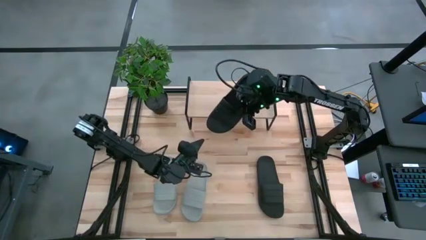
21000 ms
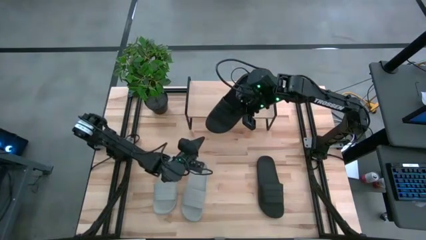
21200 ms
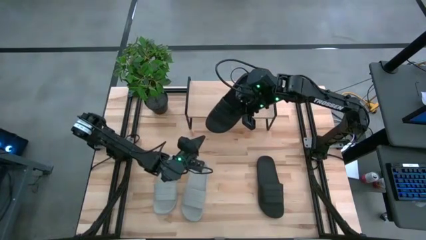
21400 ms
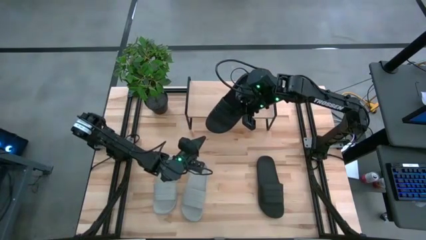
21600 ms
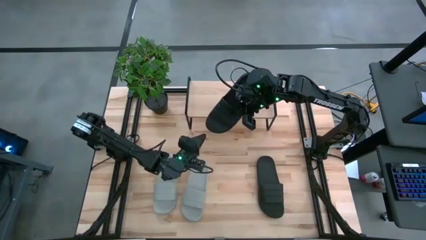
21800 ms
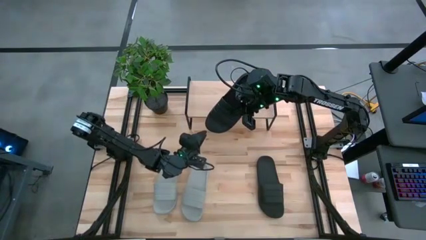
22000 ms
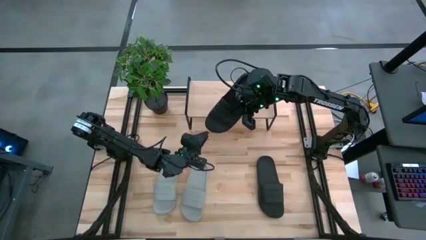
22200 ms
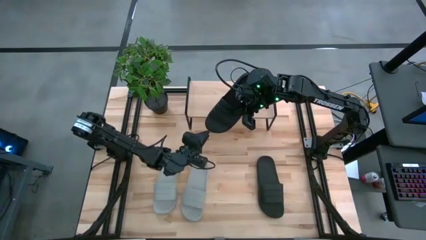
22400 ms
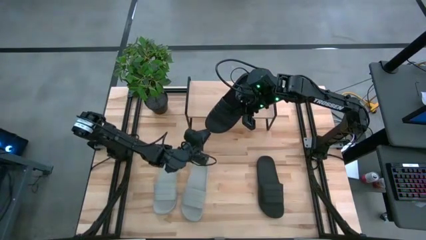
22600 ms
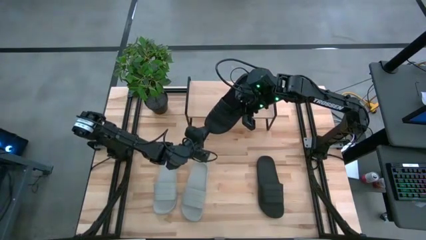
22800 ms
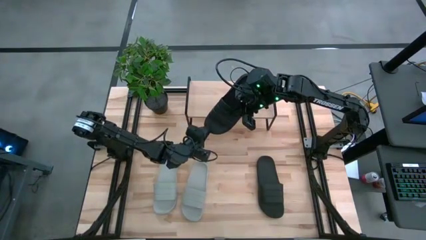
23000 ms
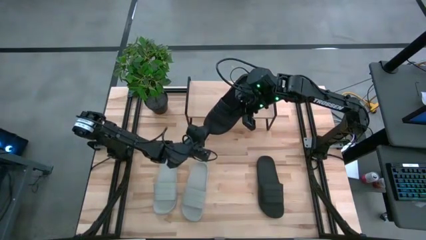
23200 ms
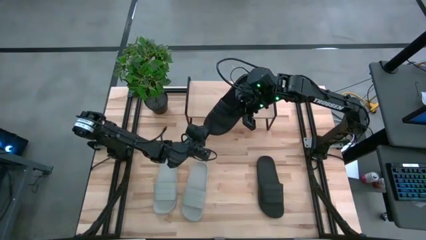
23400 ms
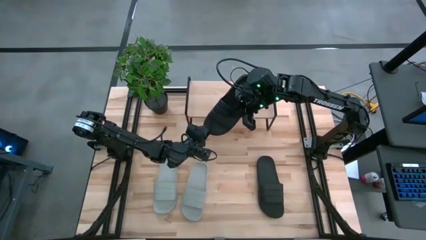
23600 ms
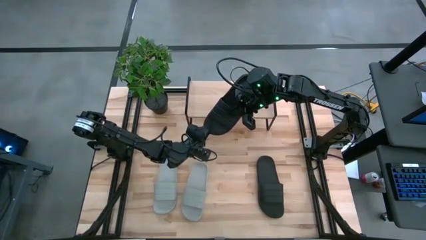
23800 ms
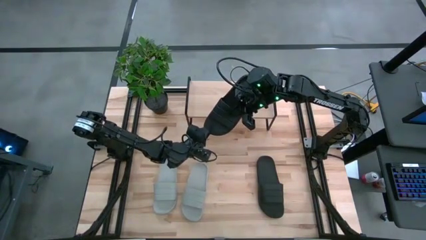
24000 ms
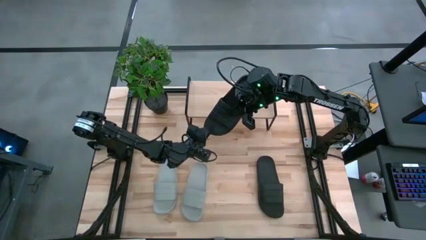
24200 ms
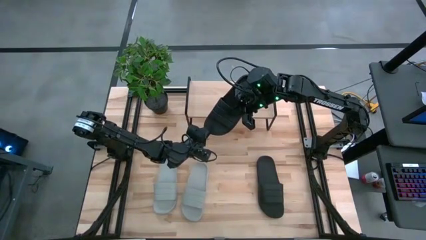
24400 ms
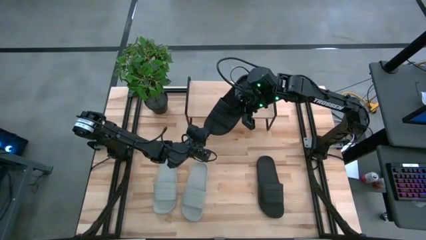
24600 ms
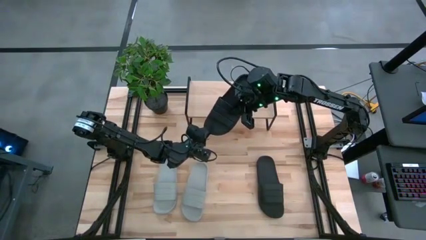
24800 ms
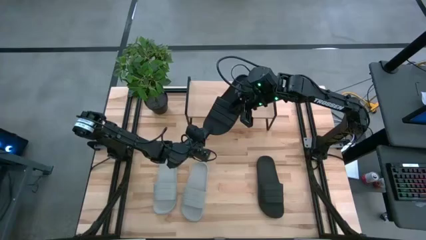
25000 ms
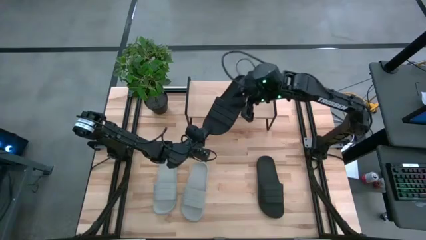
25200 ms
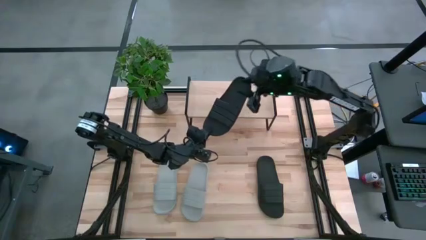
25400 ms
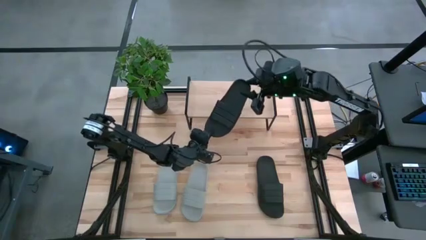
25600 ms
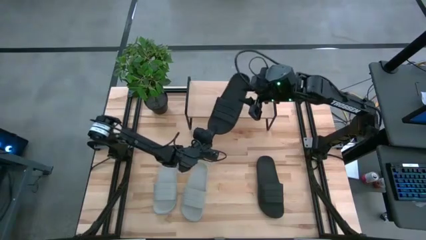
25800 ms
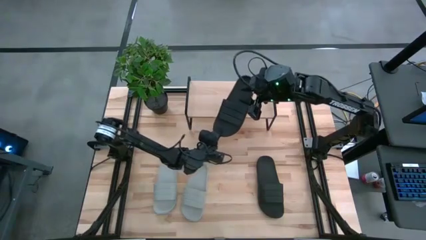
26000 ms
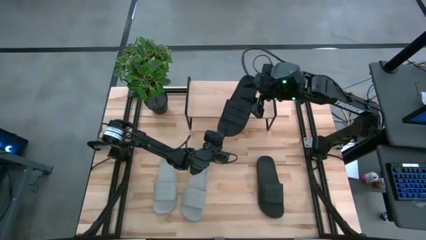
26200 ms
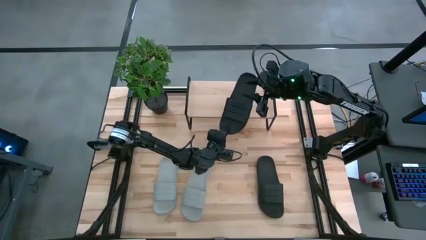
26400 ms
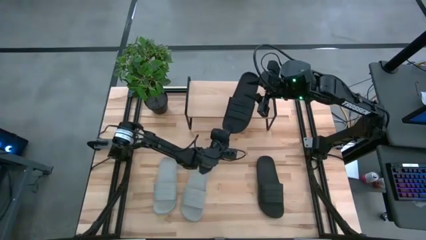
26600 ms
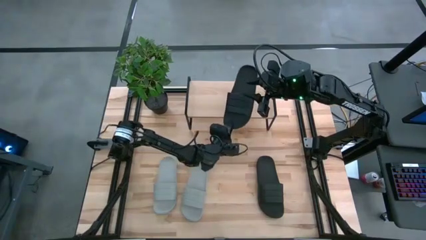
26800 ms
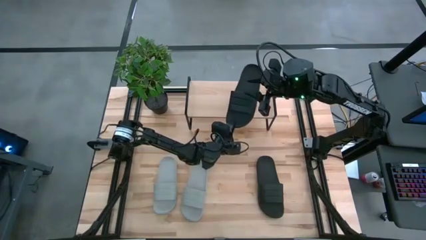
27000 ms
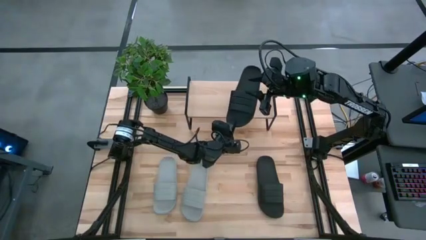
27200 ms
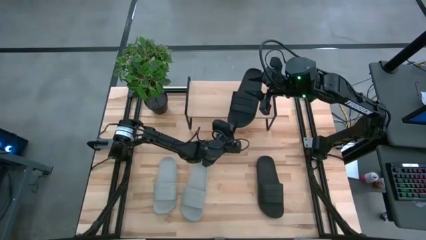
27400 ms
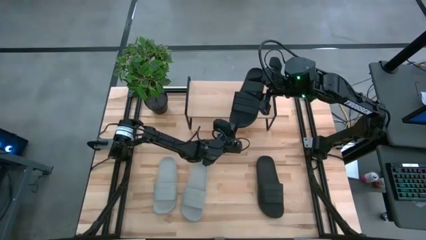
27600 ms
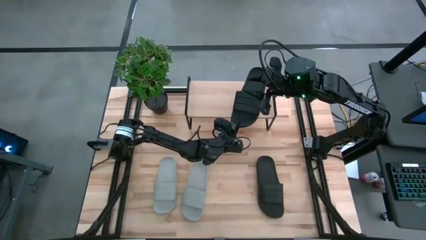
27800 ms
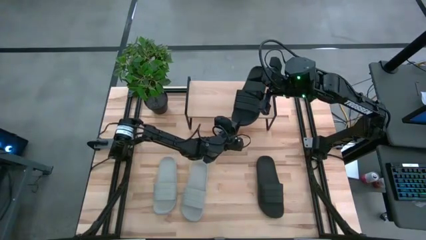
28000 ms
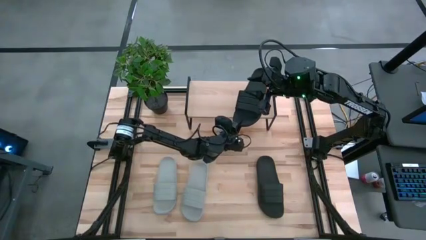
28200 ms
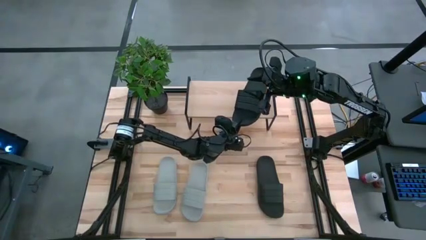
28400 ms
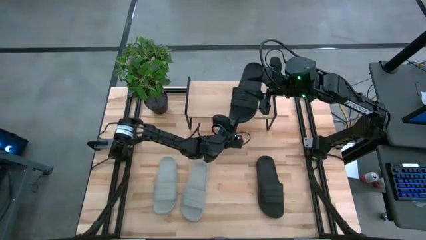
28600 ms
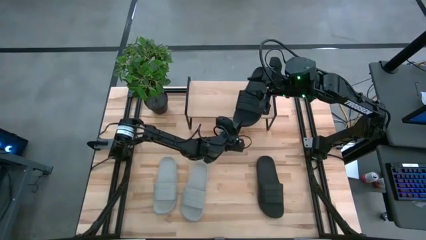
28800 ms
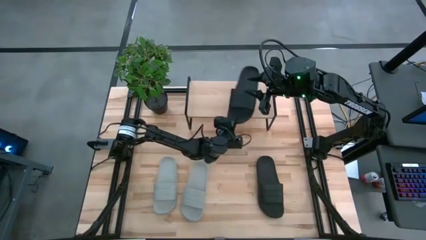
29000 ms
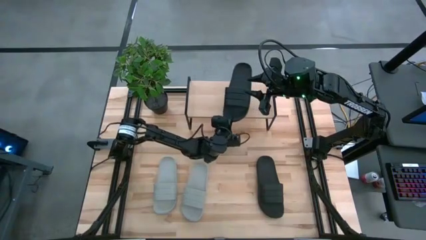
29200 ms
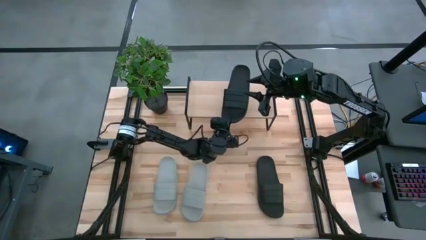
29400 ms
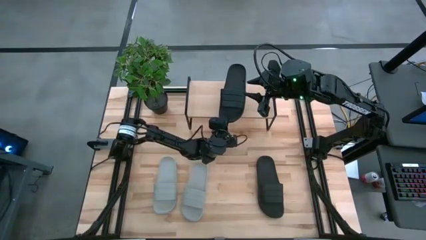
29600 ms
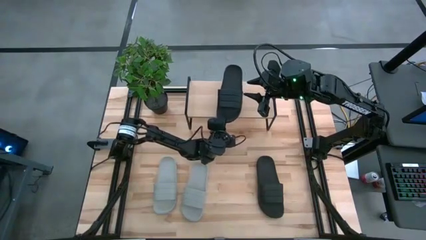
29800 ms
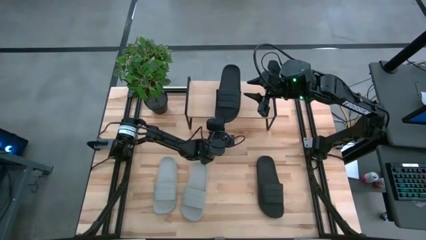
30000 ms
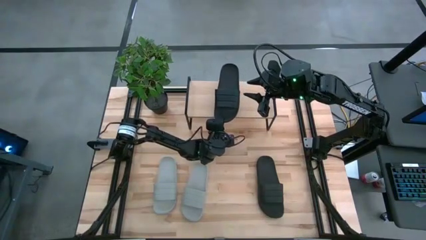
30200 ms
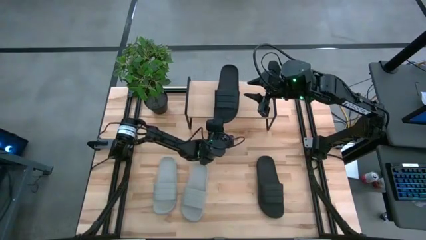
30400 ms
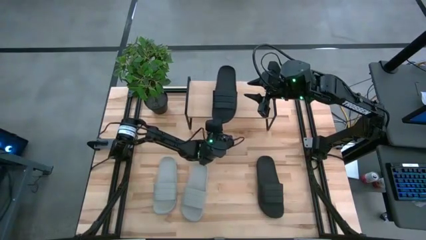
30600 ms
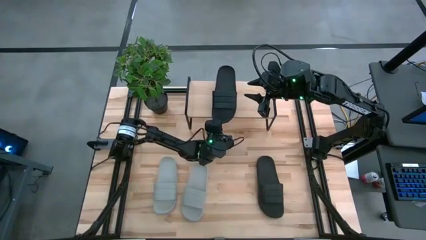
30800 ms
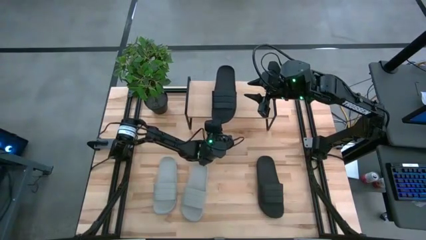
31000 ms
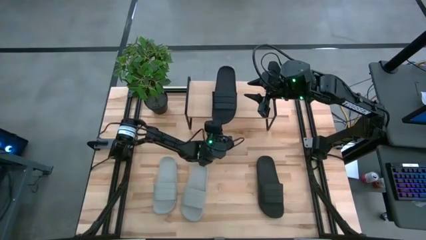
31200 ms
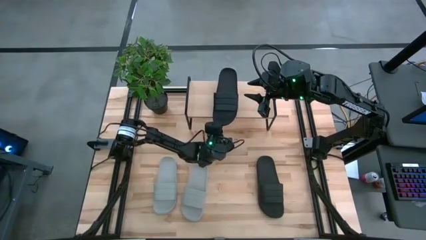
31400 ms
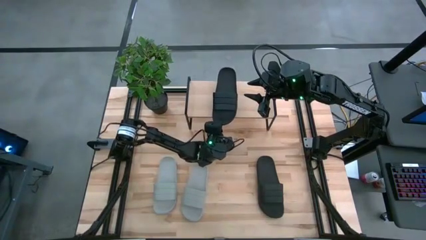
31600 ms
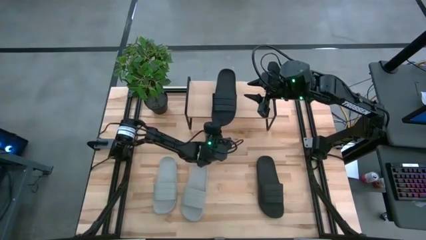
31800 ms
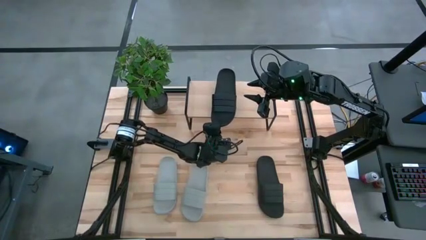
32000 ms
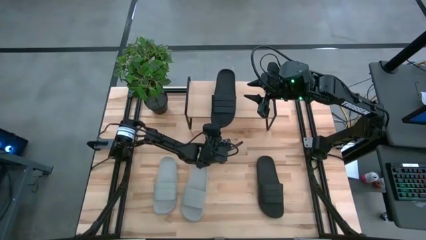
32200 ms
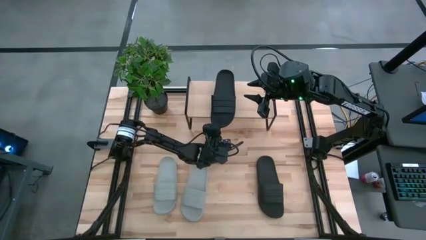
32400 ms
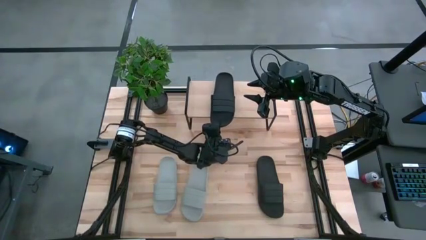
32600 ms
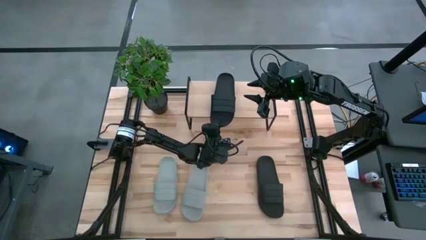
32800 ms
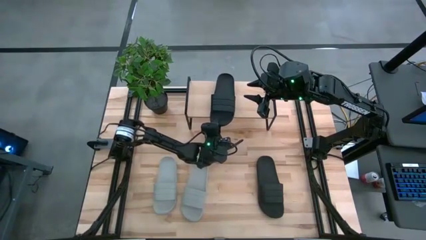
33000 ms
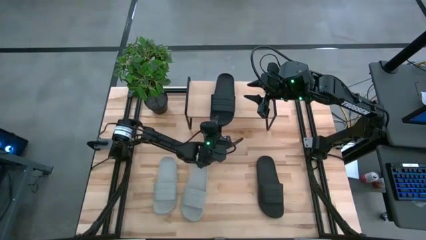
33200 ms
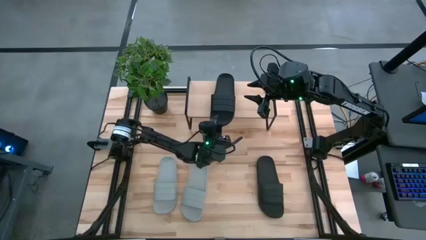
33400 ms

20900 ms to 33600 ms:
Task: Pick and place slides into the shelf
Put the left black slide on the shelf
